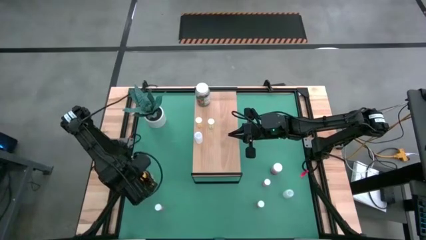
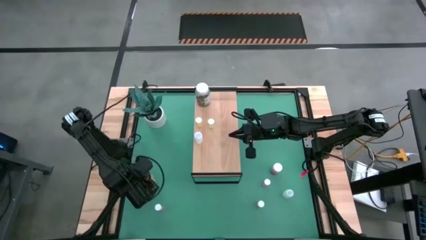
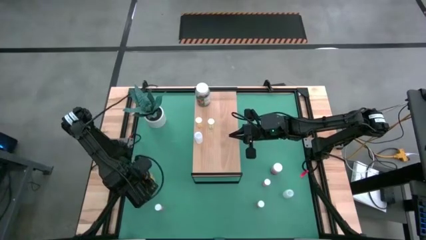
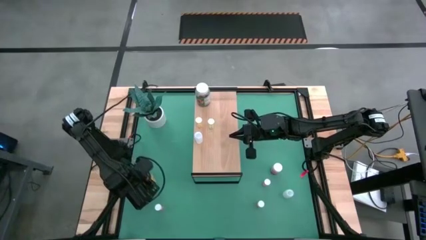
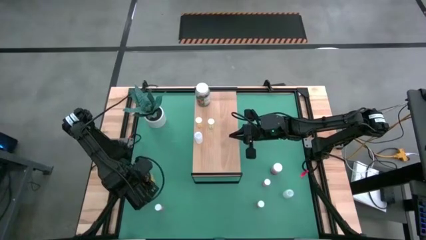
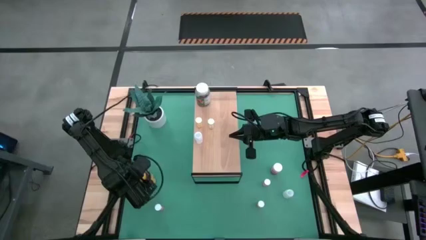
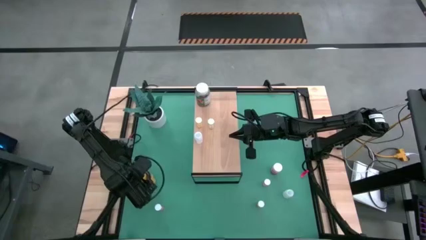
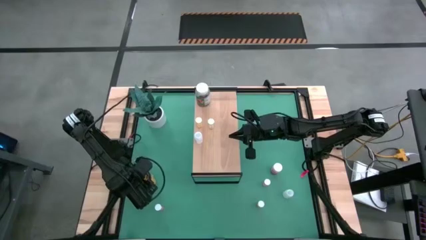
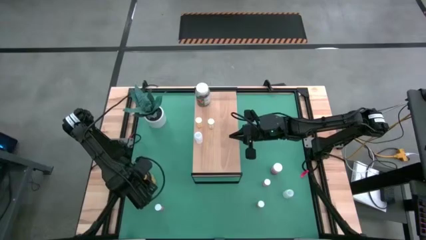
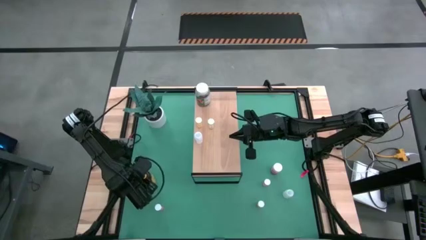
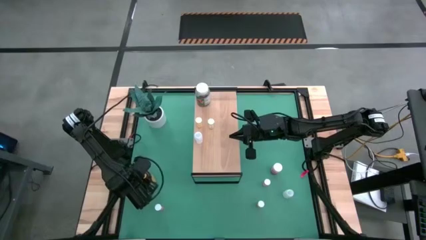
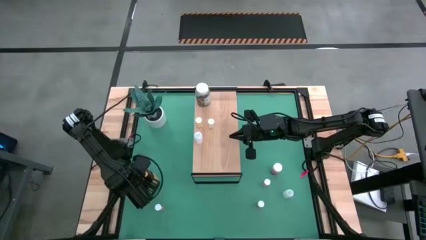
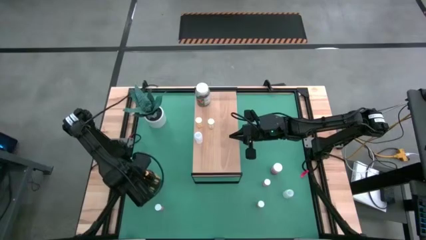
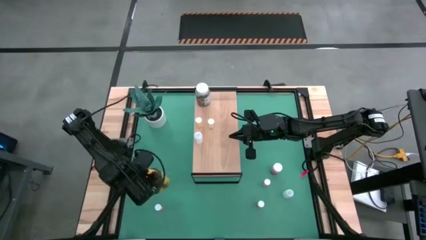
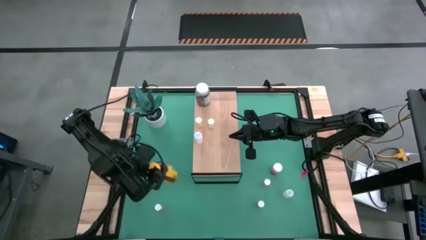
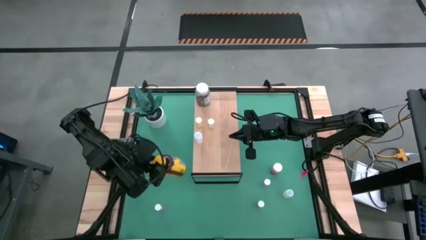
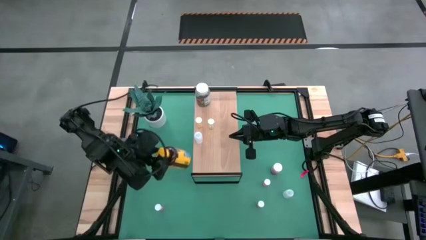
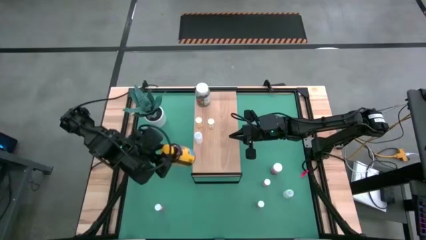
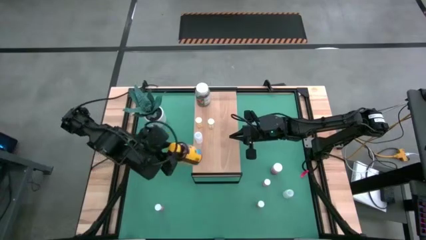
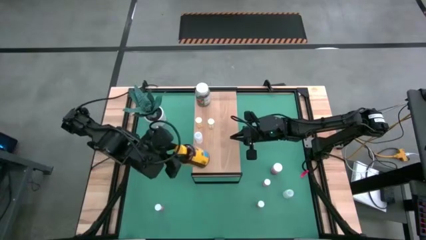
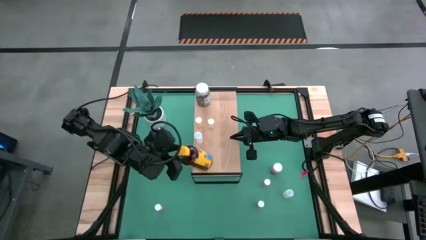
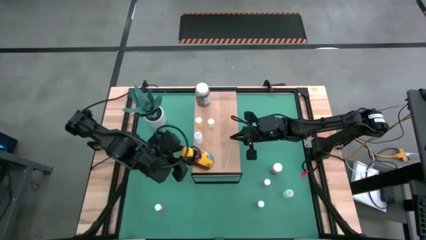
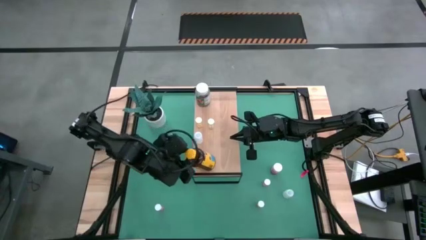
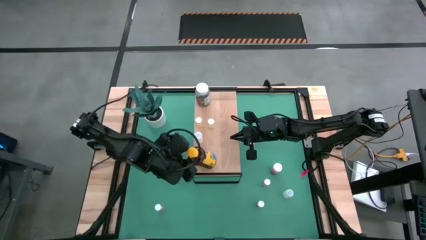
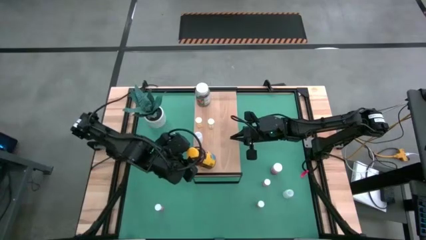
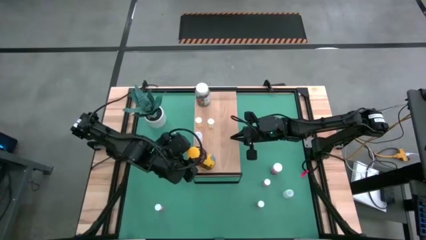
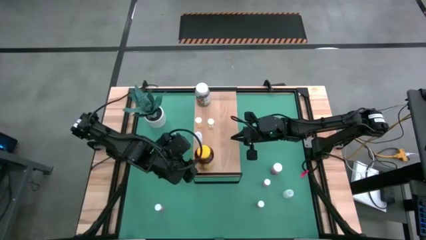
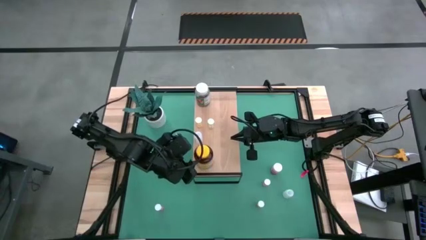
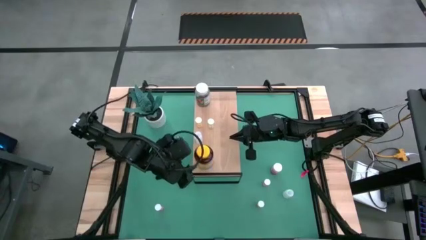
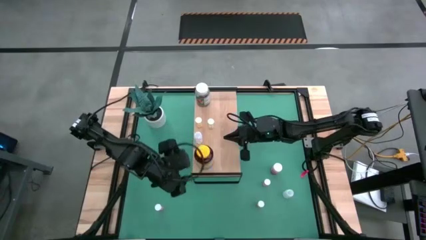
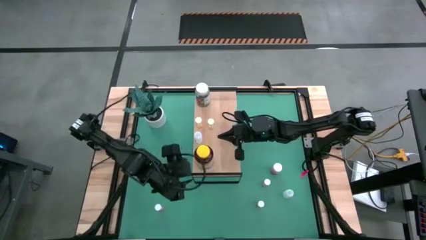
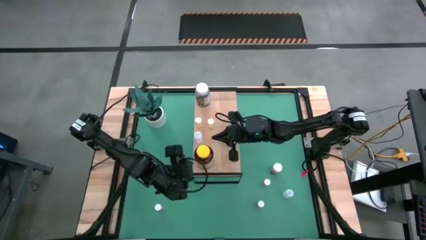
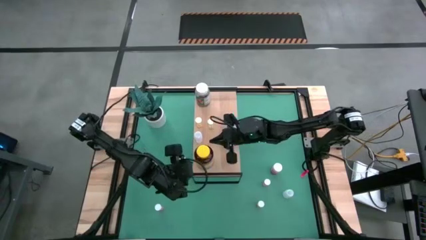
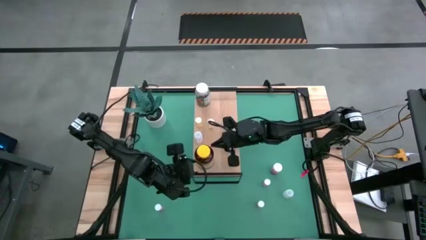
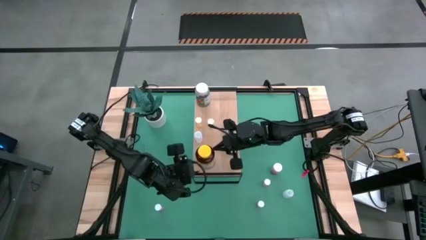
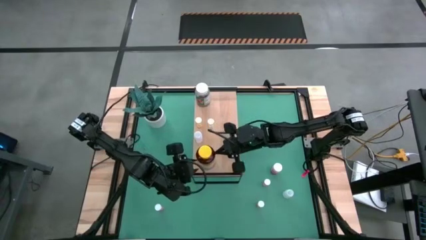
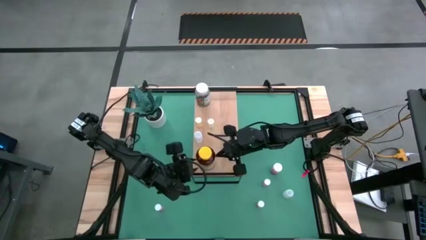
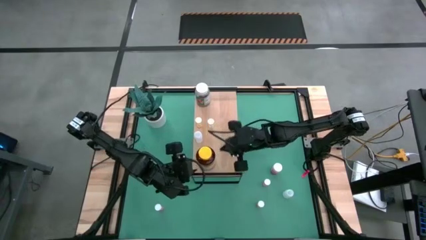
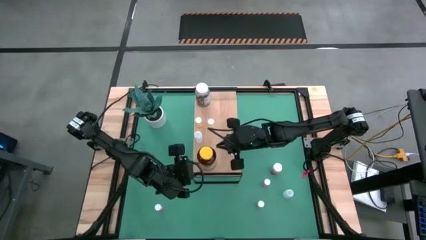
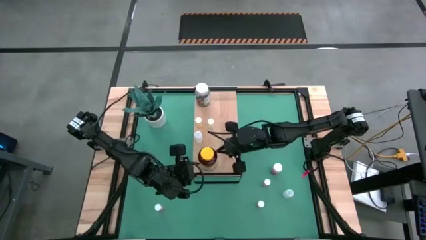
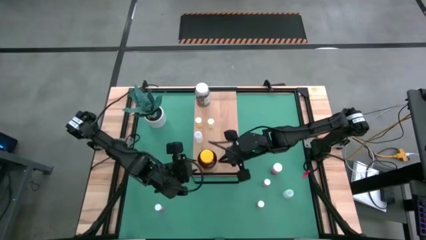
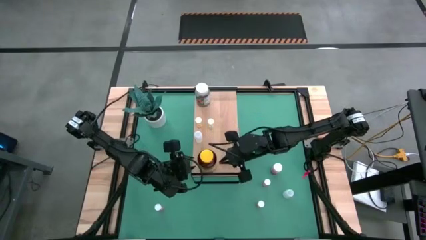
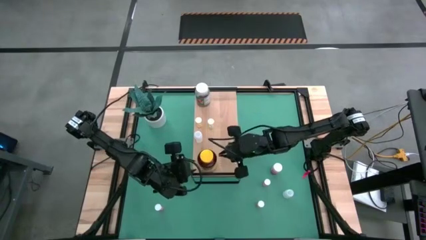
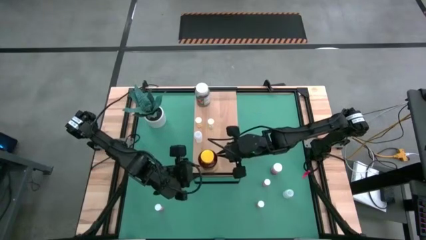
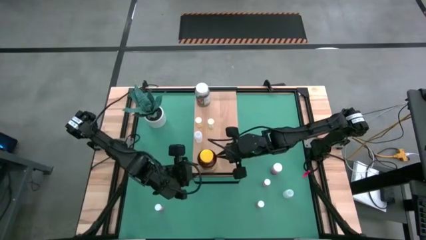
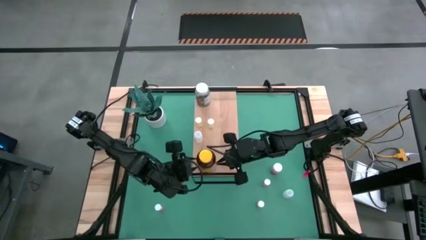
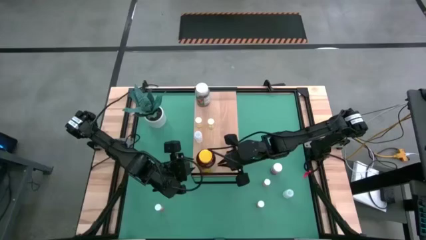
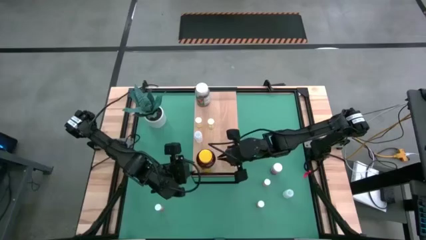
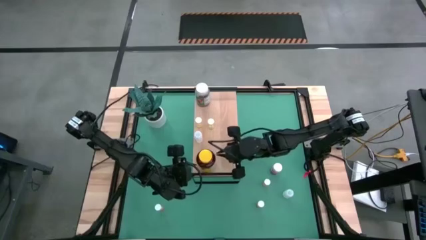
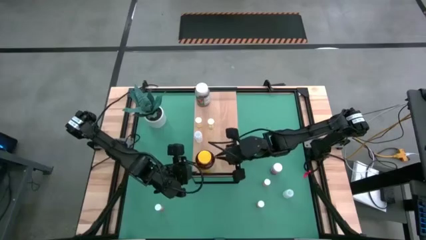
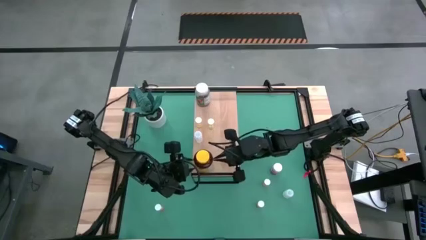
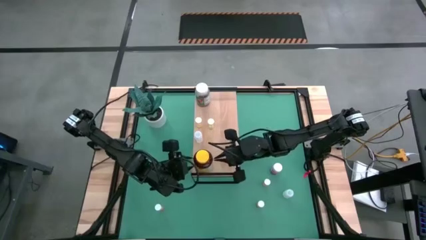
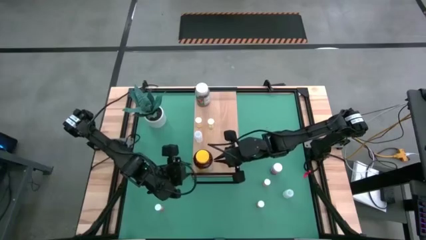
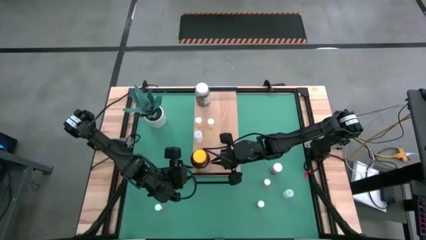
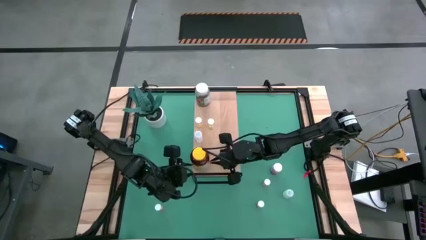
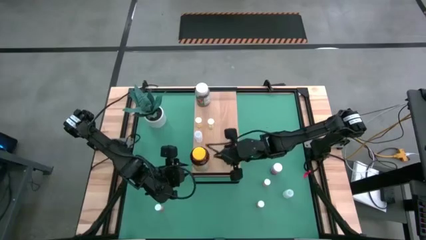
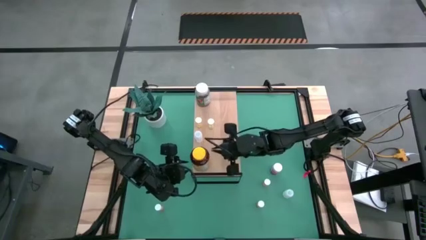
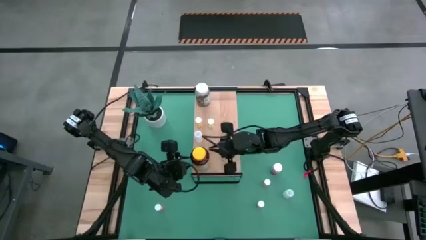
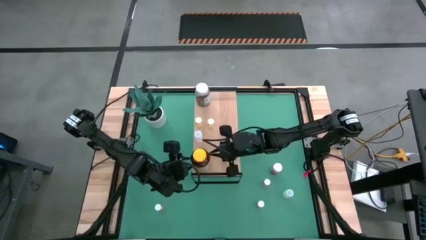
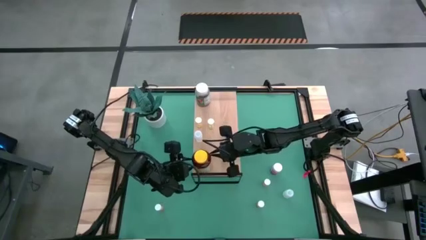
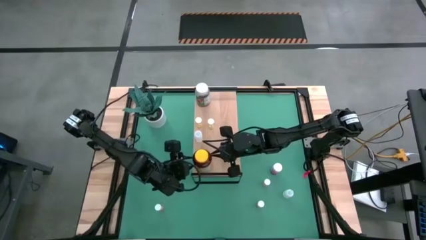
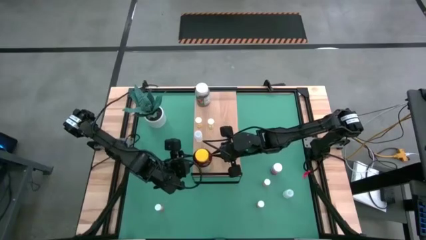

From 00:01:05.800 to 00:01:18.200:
Task: Pick and place medicine bottles onto shelf by color
Put the yellow pill bottle on the shelf

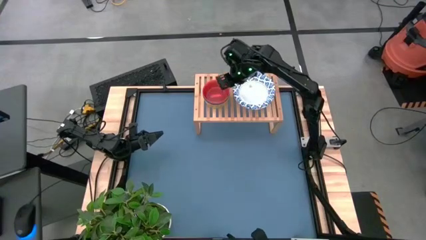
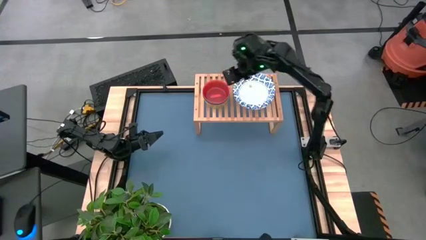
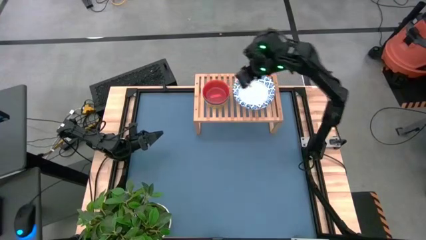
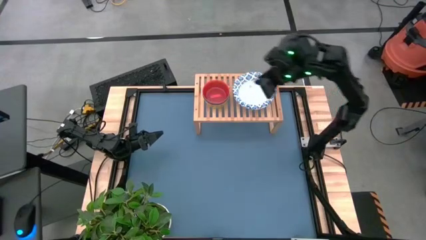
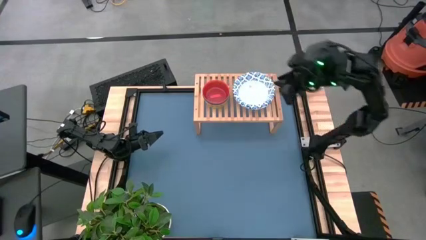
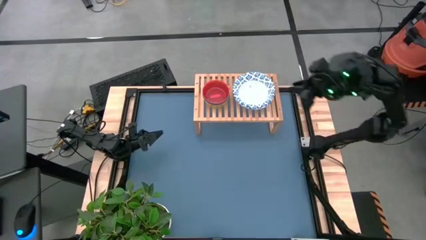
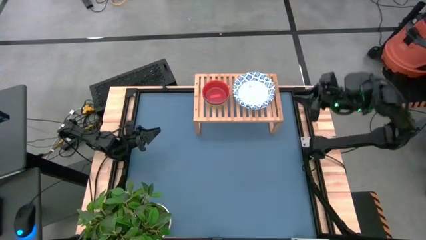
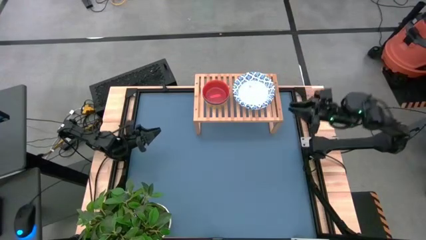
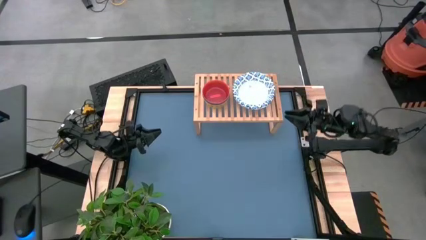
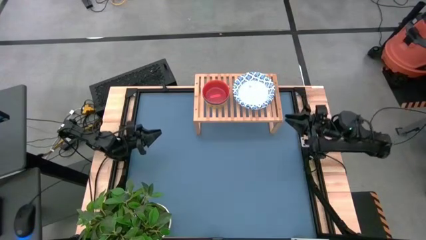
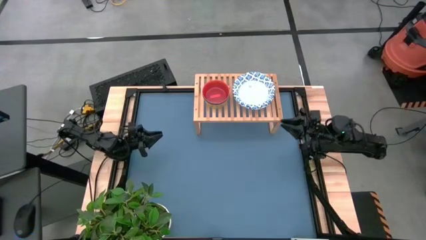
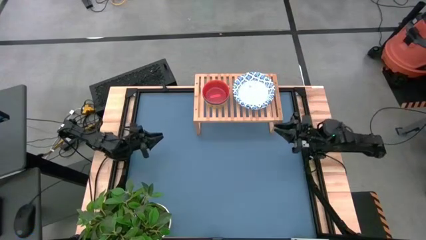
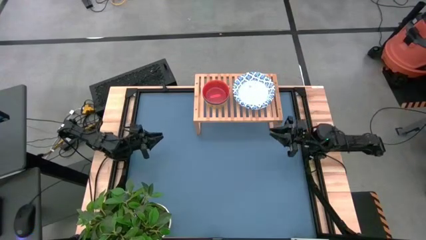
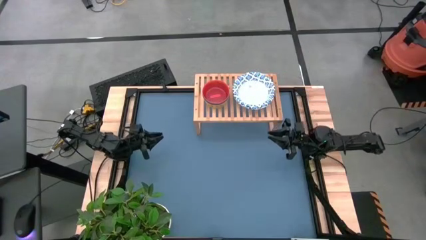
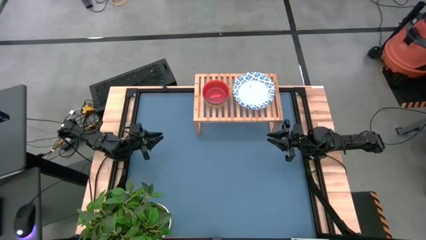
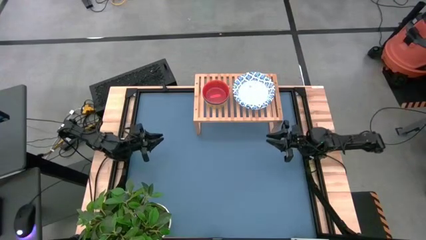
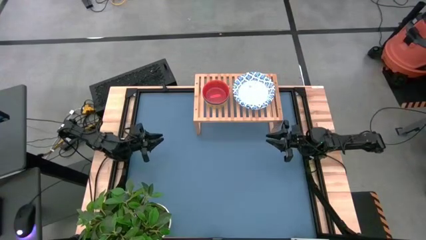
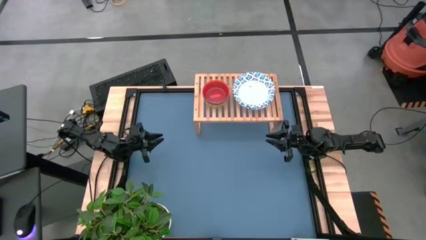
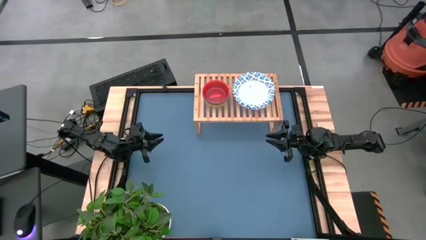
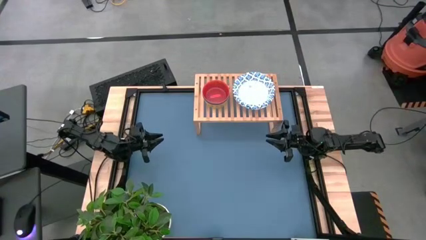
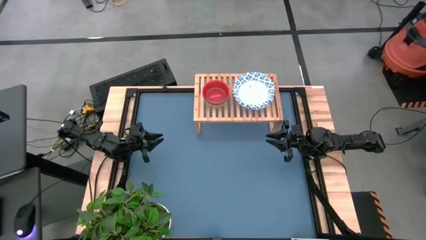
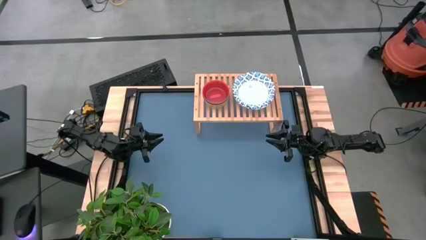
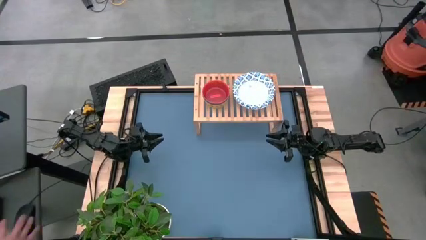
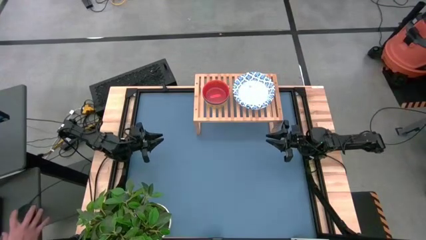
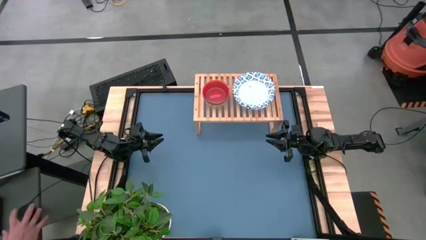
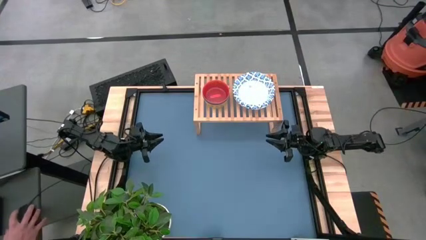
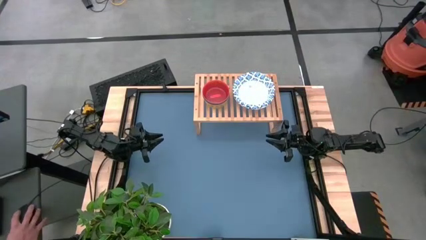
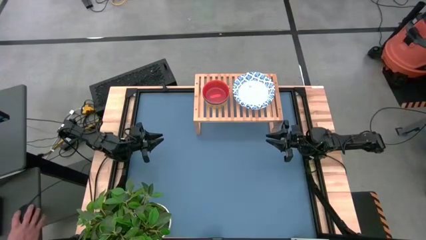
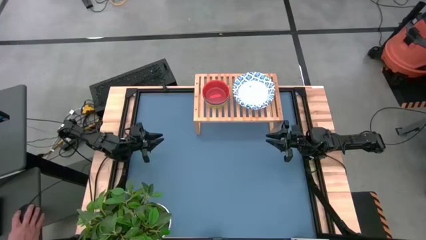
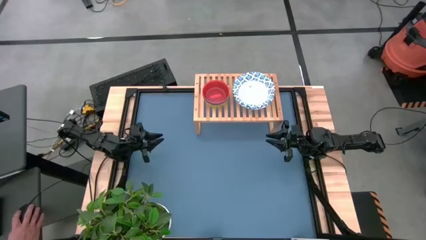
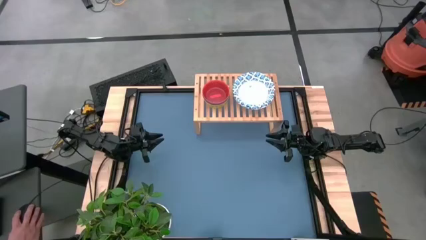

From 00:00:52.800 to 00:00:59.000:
Task: Place and stack bowls onto a shelf
Return to Home Position
